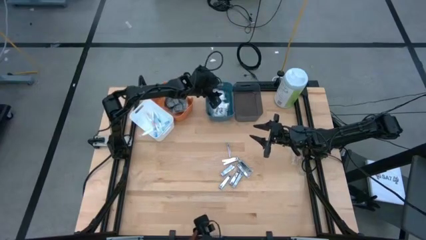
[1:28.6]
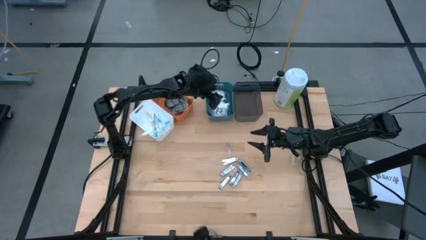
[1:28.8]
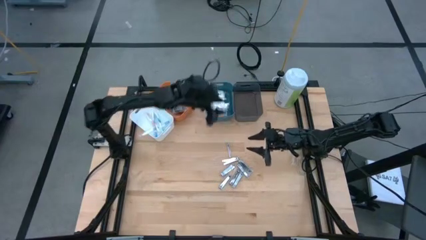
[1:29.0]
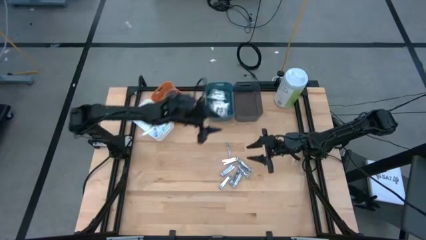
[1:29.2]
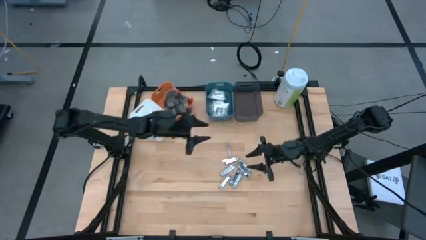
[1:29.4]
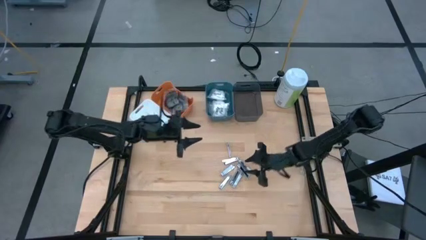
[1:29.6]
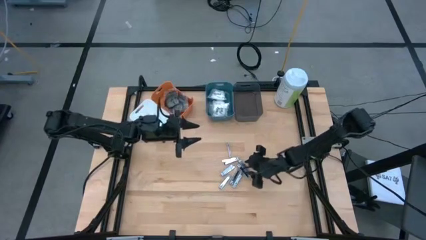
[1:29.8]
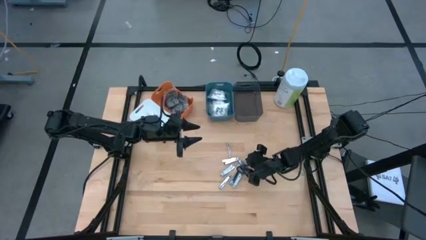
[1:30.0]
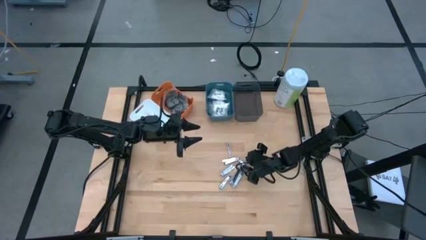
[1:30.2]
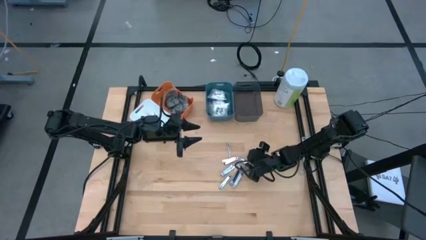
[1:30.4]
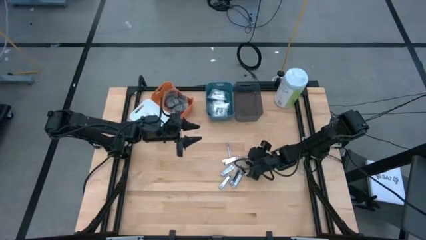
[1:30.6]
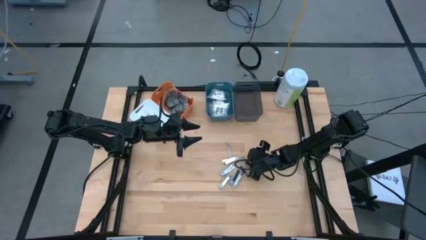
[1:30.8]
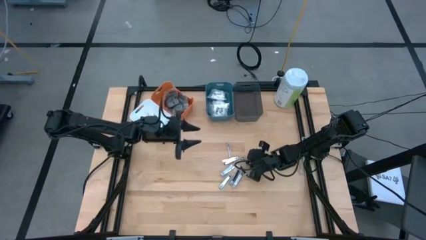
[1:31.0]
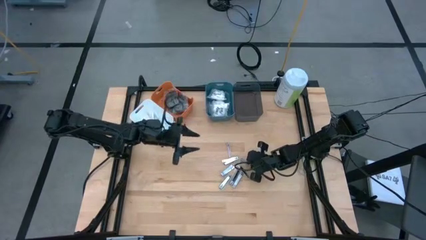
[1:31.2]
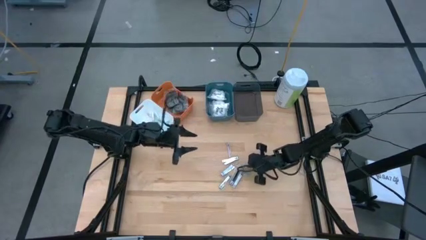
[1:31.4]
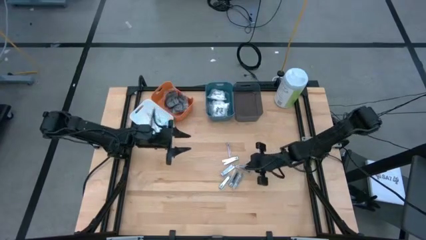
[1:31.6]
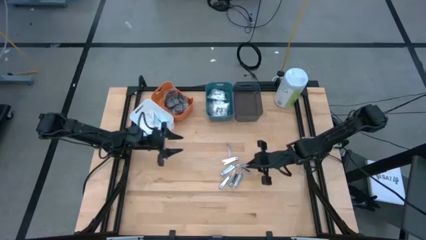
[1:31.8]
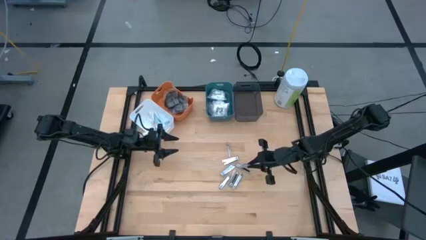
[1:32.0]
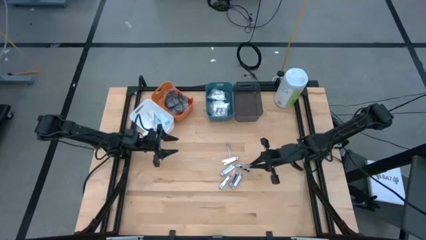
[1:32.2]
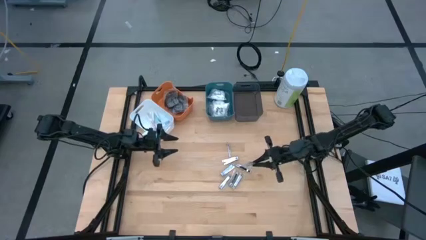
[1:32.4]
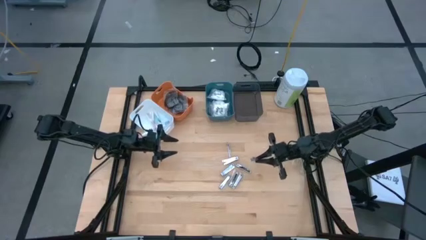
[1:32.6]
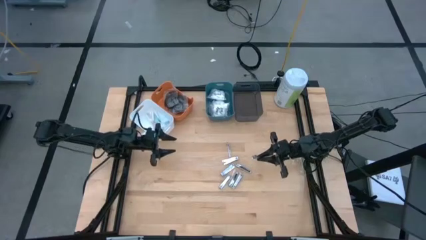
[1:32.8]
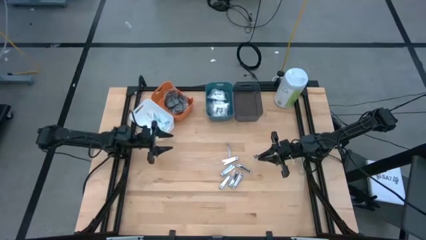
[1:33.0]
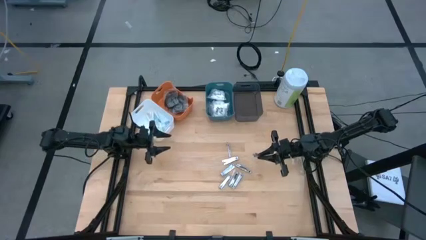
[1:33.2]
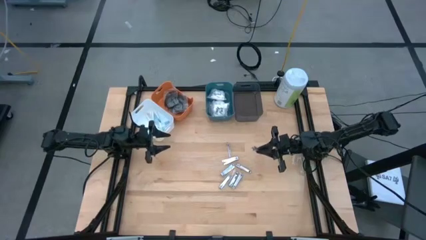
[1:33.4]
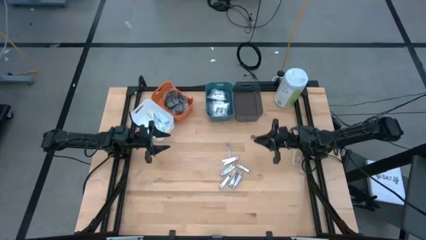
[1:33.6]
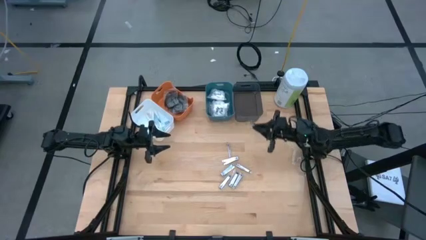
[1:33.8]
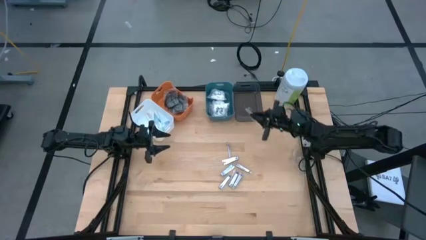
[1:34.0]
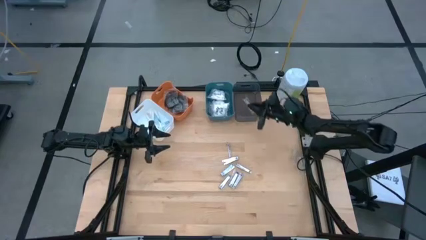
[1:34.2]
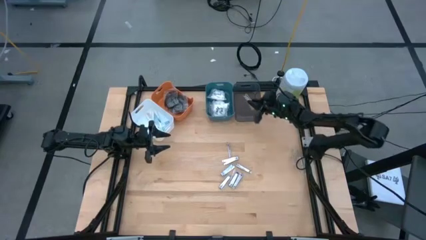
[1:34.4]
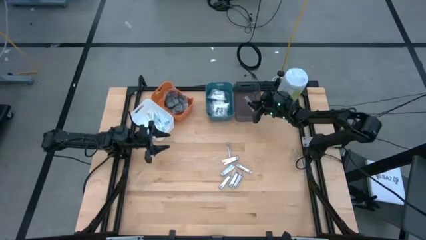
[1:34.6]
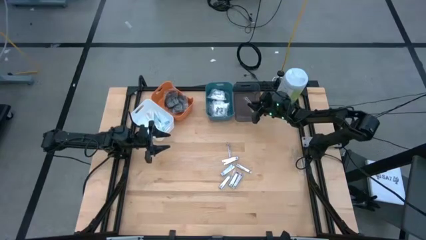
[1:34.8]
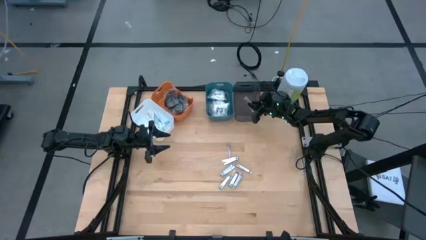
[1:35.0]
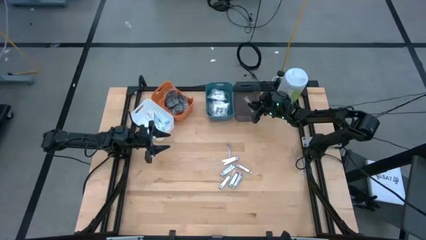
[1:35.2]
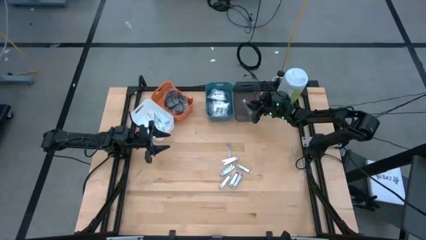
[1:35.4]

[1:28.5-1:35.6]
Task: Pick & Place Travel size toiletries
Put the silver nail cutter into the transparent gray bin

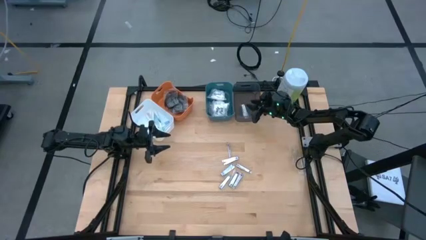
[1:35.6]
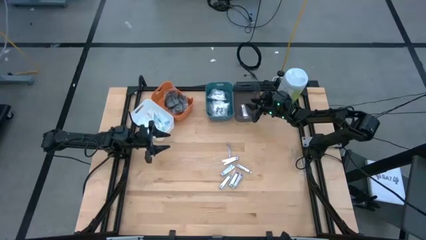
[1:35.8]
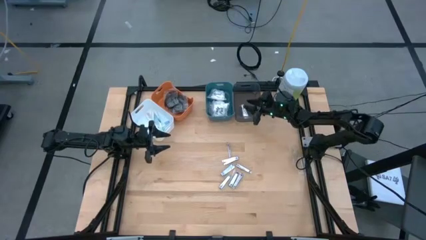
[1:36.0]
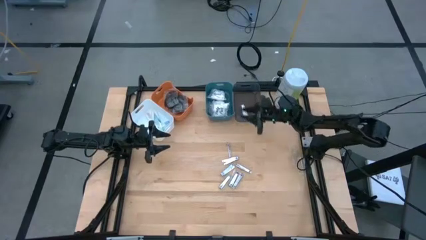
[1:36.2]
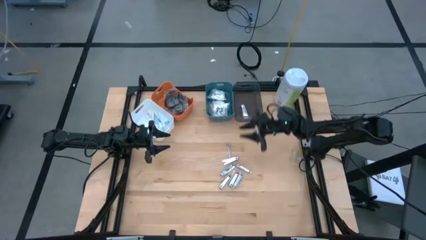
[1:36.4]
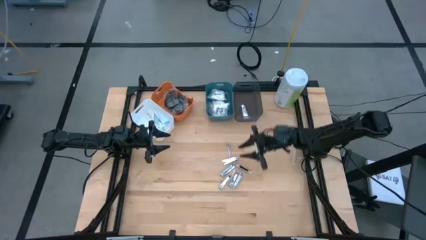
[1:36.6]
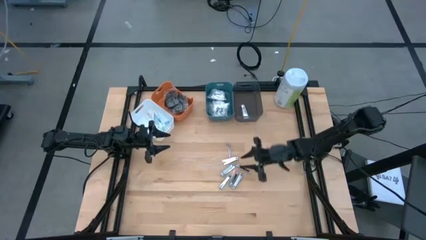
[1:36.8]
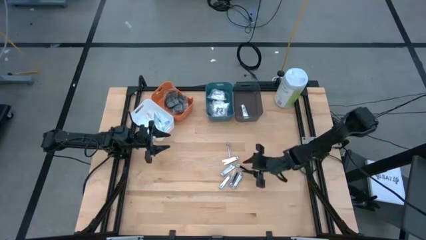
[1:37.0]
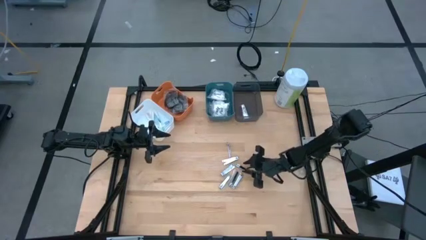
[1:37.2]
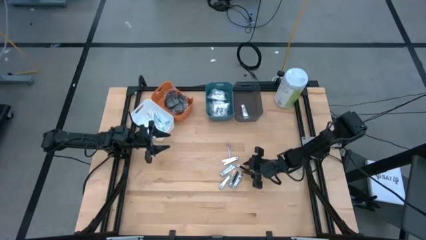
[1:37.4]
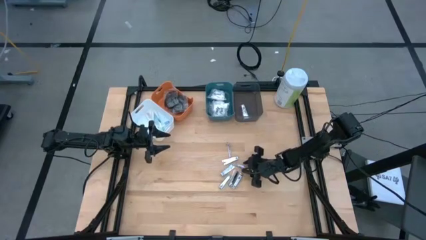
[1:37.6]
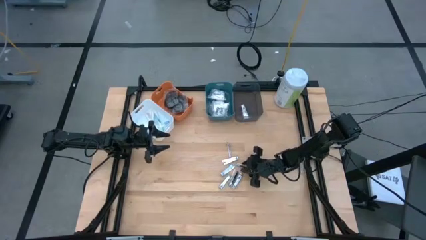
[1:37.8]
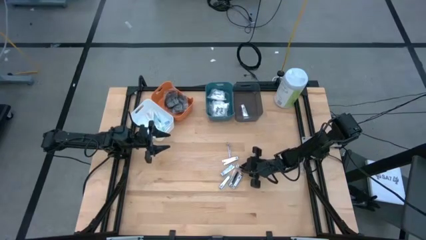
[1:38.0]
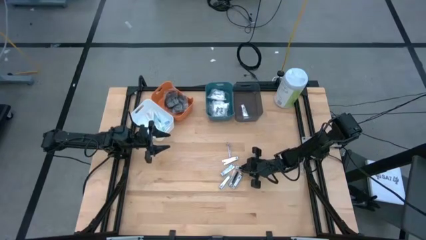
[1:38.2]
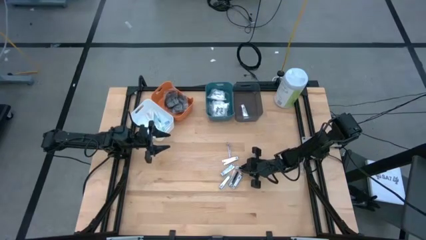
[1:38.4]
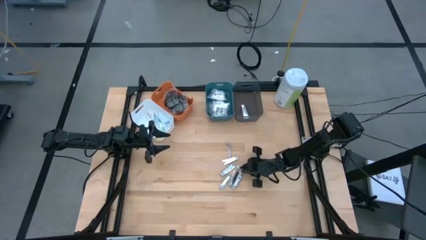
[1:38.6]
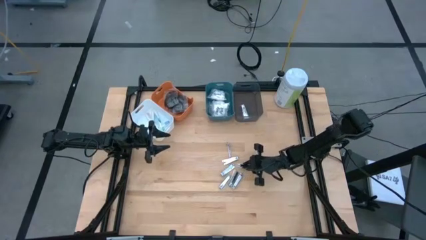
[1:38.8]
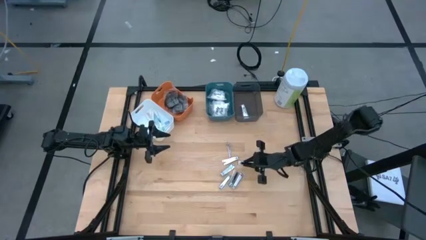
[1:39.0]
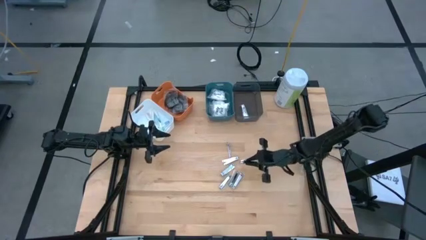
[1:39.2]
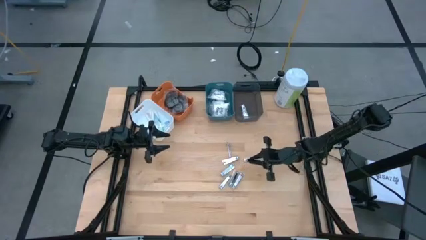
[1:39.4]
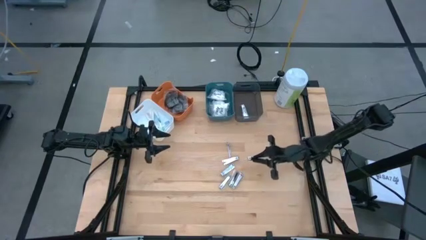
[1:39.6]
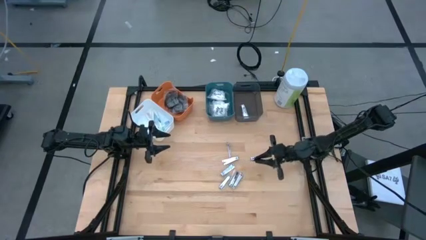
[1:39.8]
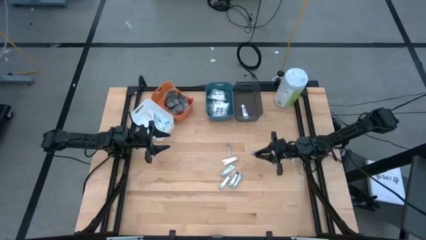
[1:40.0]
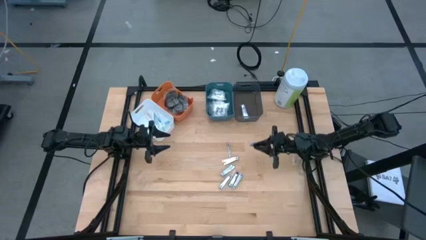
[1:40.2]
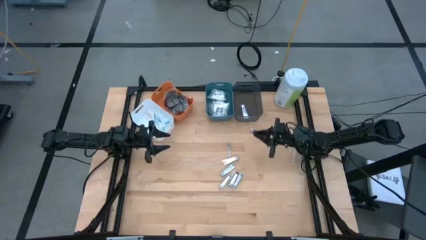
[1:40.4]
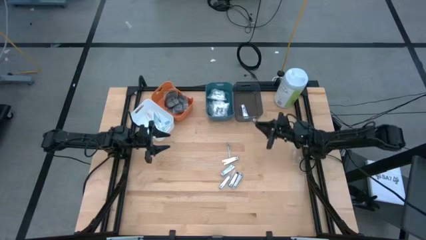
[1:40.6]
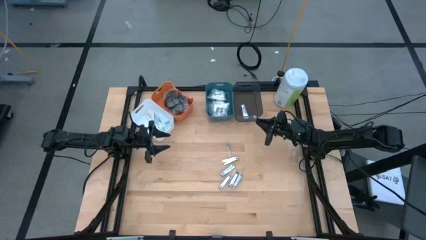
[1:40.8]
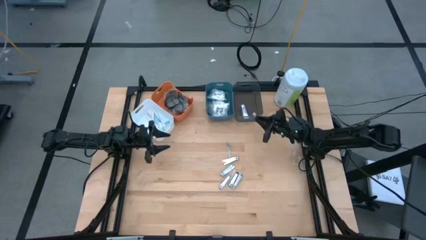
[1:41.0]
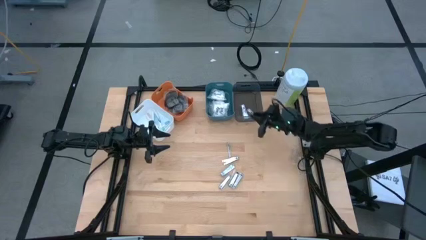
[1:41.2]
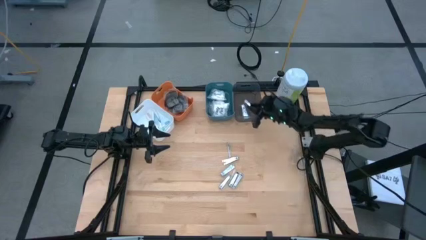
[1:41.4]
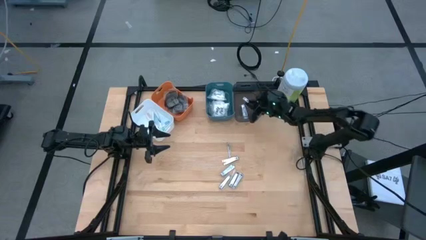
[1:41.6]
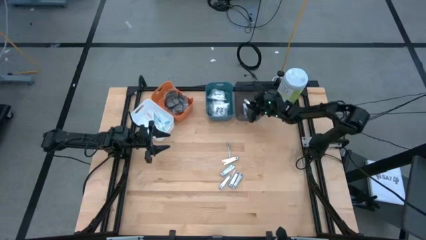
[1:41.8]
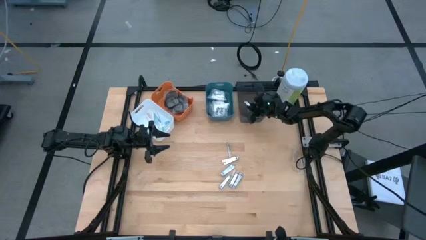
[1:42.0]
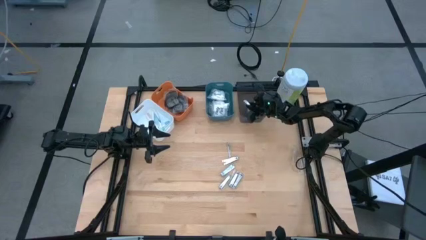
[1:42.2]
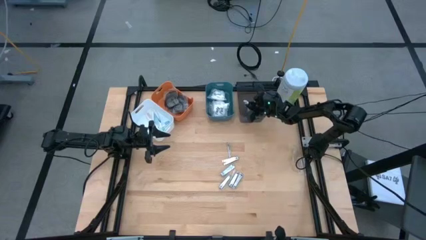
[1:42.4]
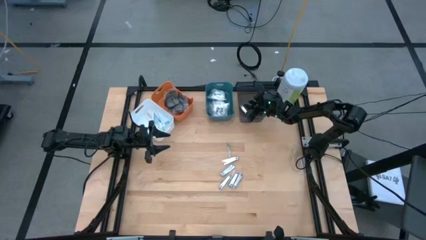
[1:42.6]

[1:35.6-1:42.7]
Put the silver nail cutter into the black bin

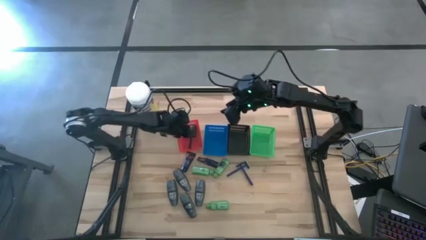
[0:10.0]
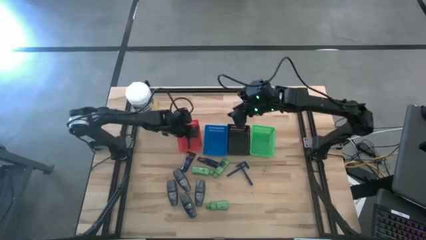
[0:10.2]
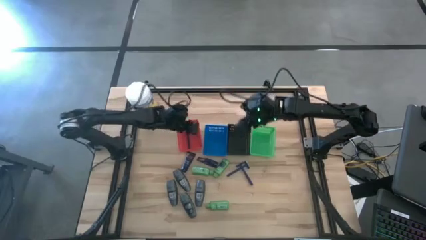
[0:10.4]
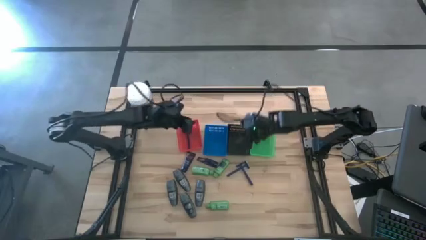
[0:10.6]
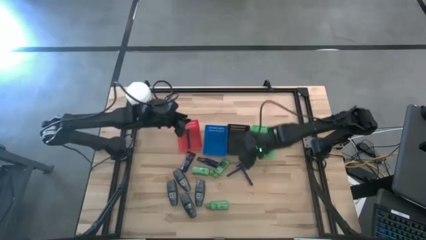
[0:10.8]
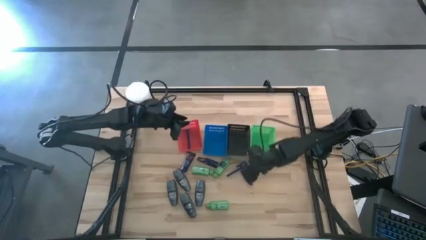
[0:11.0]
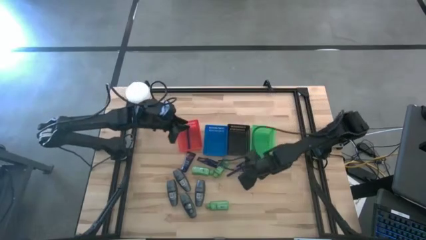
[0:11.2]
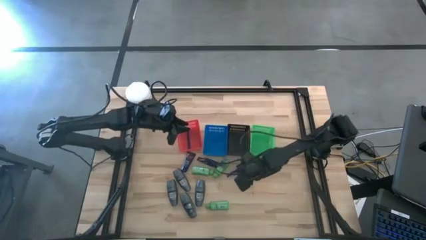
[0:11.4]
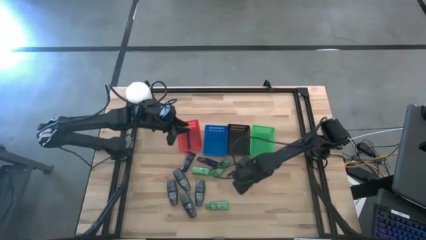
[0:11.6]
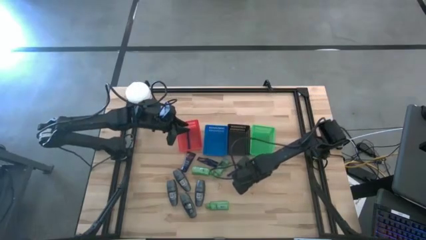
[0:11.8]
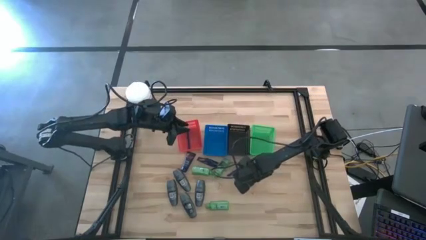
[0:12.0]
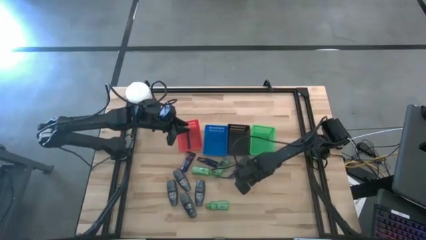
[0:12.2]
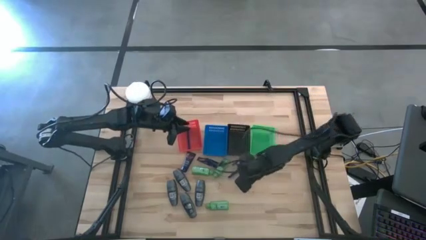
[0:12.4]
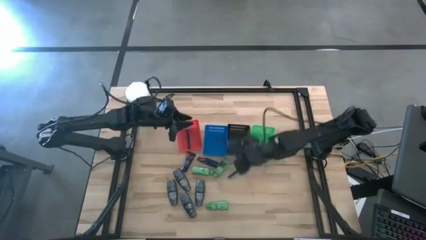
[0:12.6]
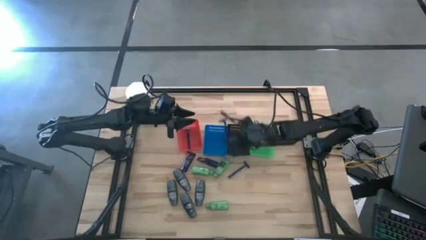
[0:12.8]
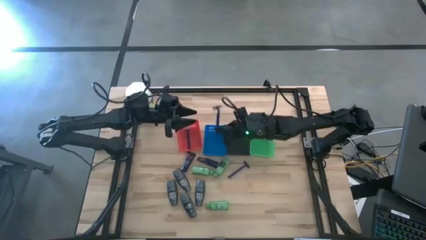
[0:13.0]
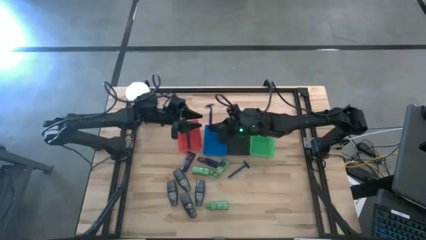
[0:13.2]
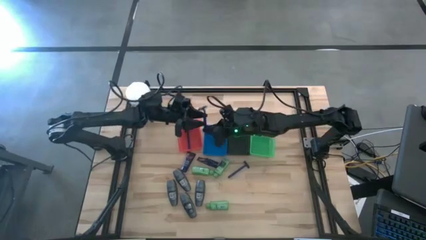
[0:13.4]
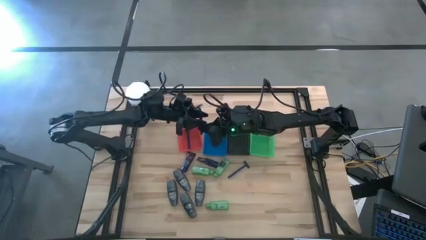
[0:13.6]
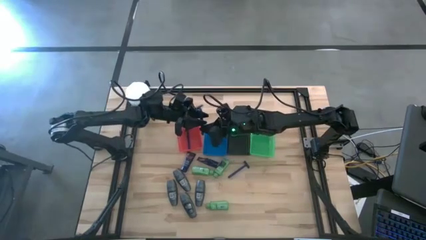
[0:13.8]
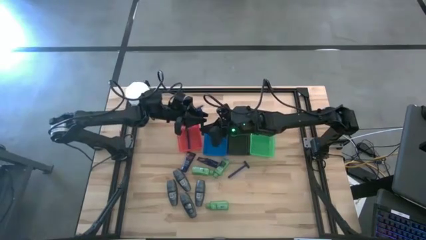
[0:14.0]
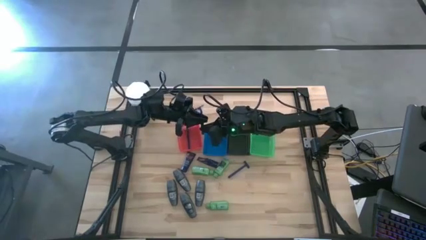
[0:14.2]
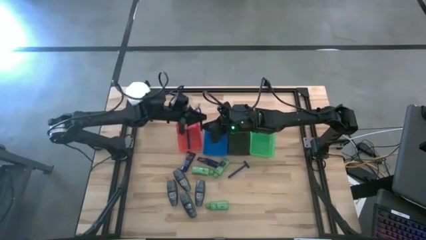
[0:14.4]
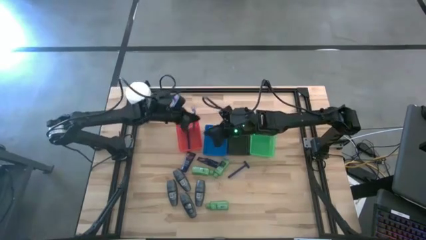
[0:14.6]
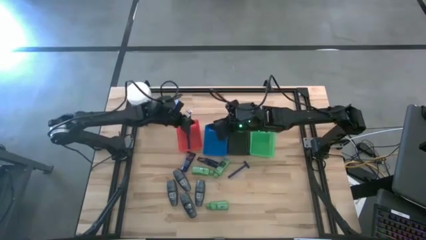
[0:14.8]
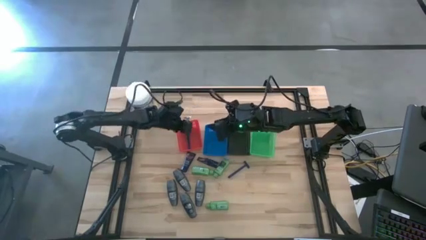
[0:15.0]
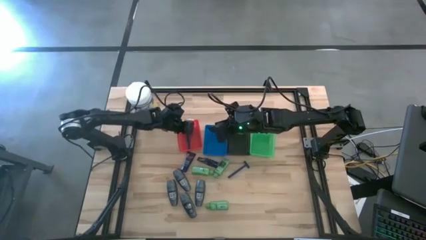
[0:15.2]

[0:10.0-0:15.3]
Task: Pick & Place Travel size toiletries
Put the razor into the red basket
